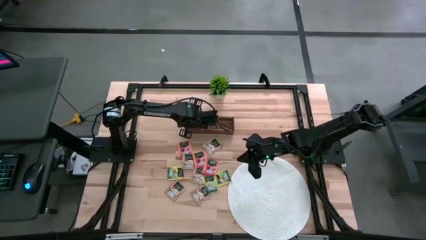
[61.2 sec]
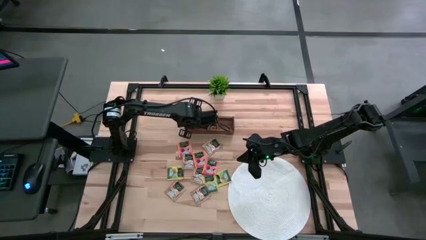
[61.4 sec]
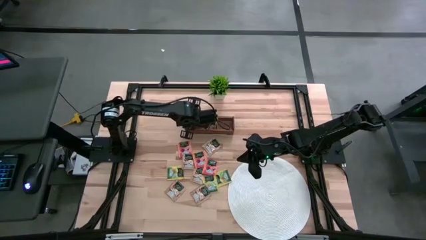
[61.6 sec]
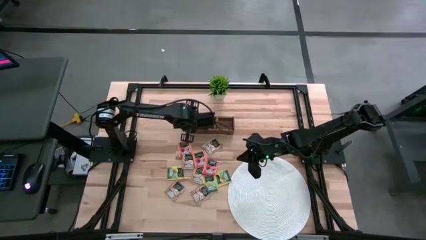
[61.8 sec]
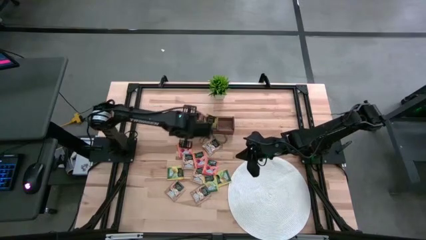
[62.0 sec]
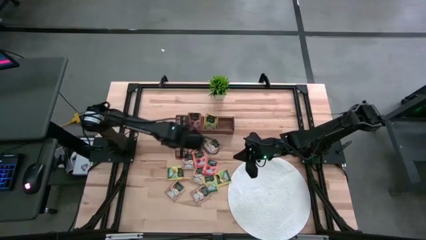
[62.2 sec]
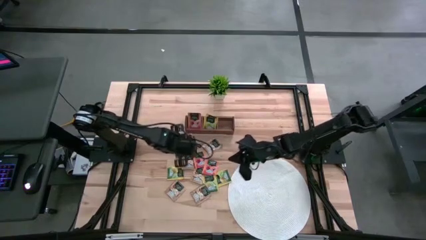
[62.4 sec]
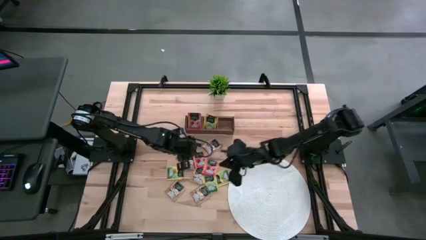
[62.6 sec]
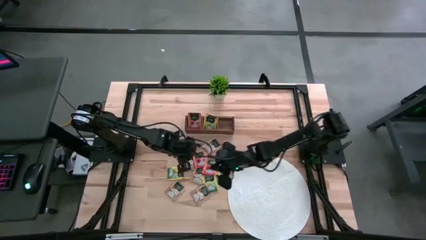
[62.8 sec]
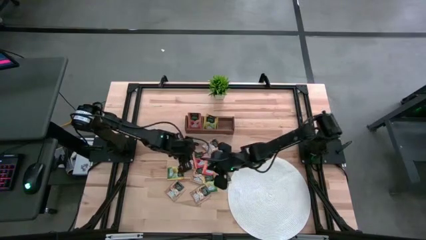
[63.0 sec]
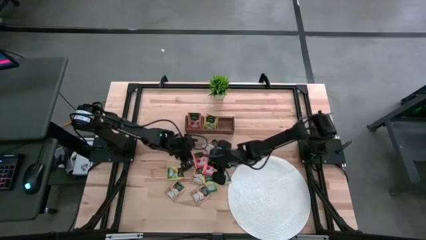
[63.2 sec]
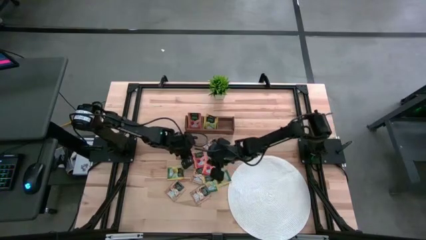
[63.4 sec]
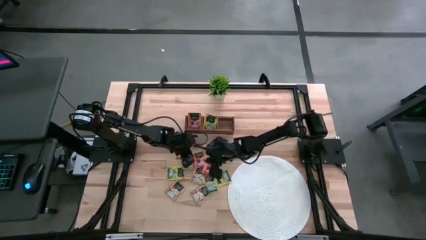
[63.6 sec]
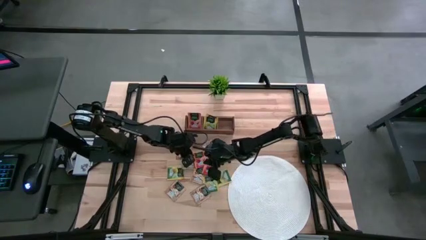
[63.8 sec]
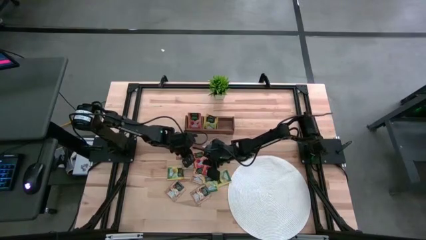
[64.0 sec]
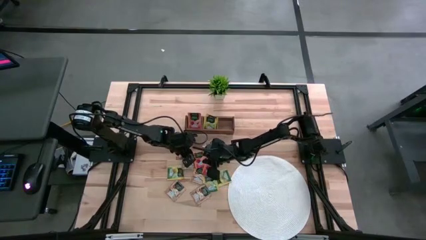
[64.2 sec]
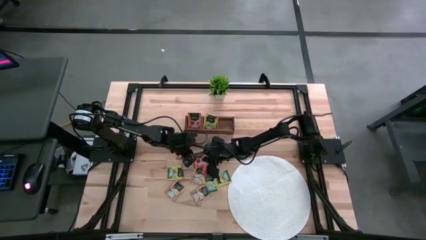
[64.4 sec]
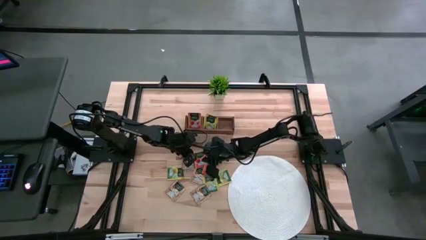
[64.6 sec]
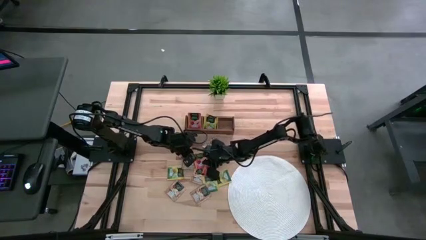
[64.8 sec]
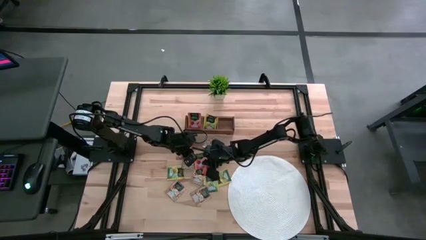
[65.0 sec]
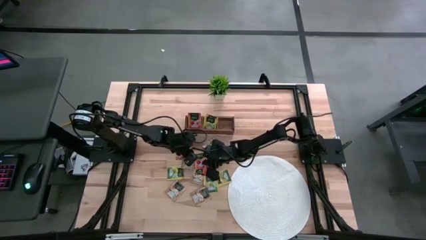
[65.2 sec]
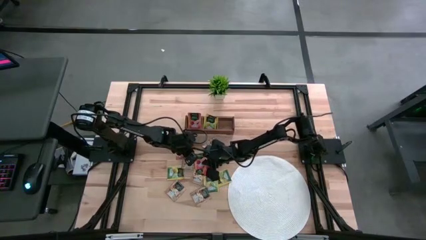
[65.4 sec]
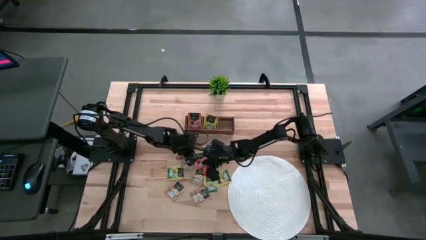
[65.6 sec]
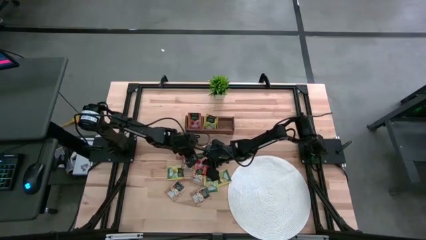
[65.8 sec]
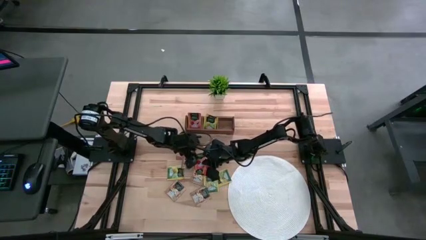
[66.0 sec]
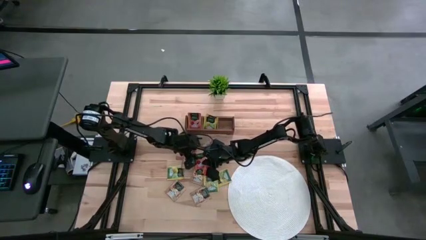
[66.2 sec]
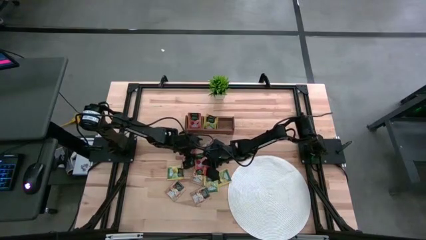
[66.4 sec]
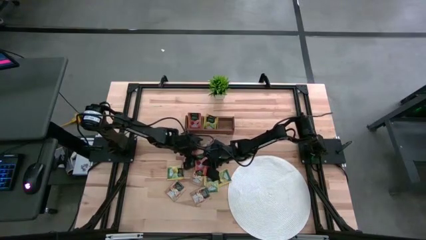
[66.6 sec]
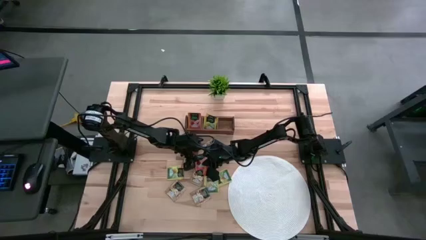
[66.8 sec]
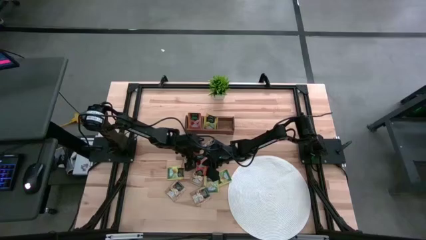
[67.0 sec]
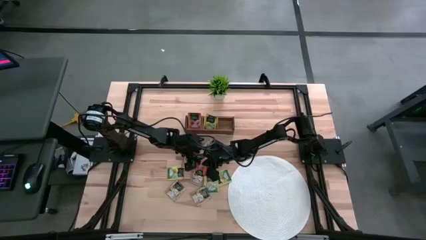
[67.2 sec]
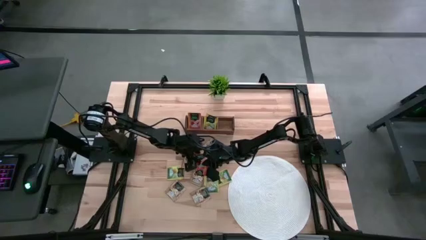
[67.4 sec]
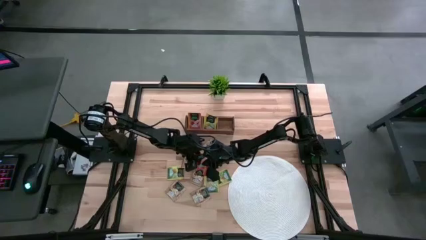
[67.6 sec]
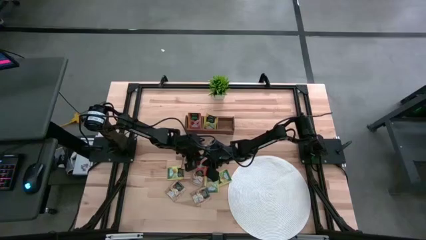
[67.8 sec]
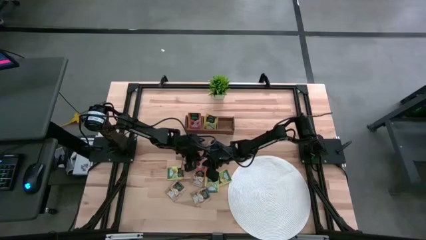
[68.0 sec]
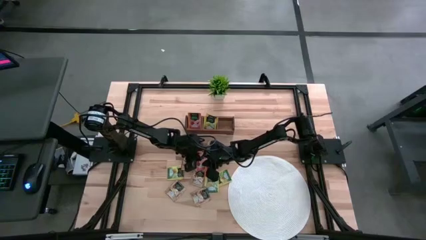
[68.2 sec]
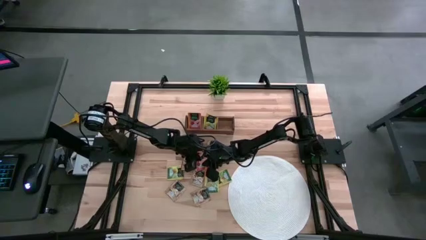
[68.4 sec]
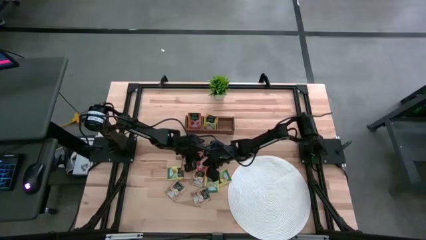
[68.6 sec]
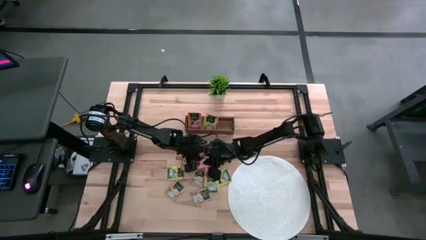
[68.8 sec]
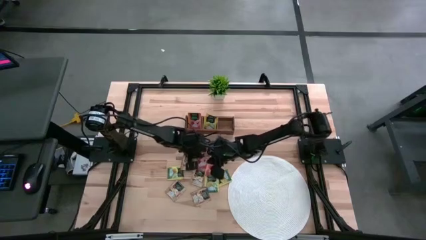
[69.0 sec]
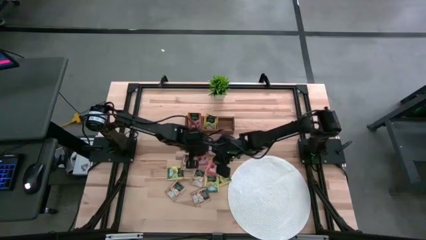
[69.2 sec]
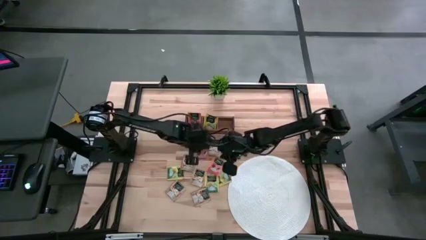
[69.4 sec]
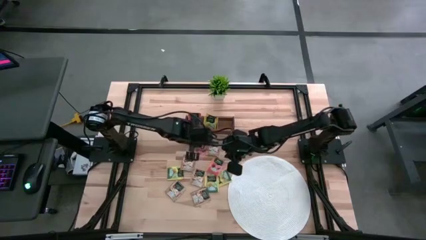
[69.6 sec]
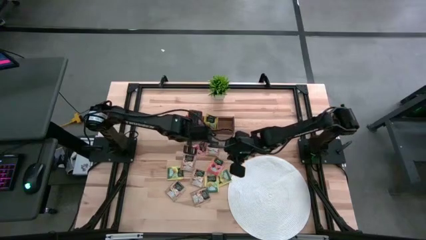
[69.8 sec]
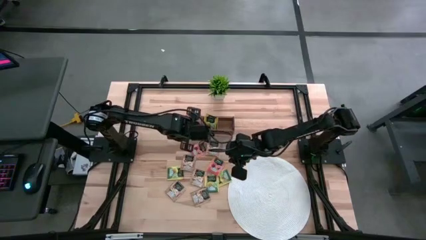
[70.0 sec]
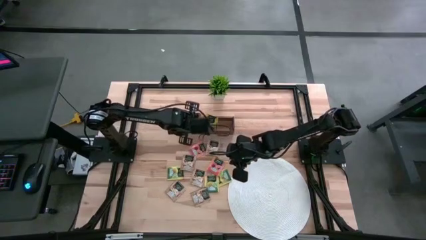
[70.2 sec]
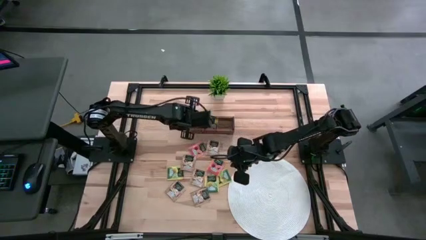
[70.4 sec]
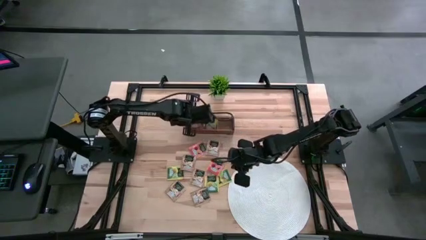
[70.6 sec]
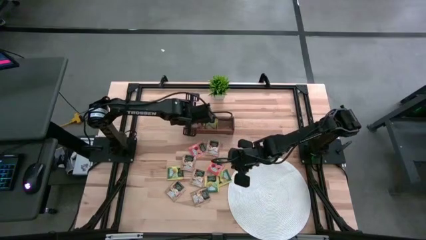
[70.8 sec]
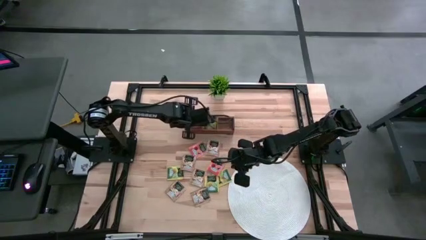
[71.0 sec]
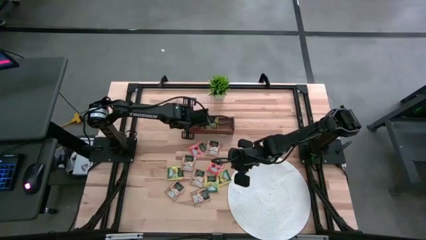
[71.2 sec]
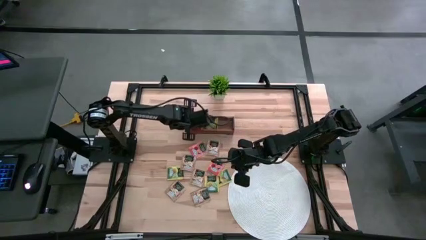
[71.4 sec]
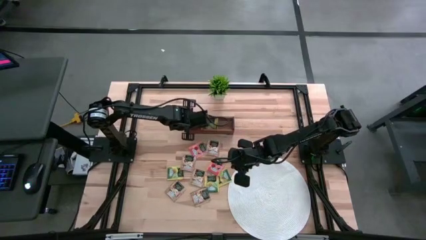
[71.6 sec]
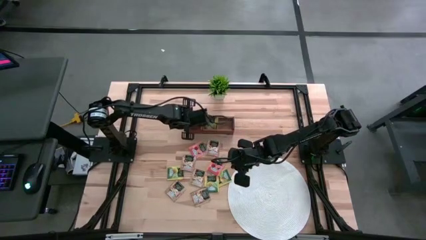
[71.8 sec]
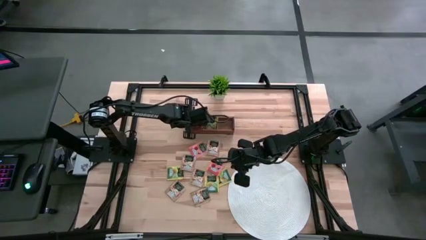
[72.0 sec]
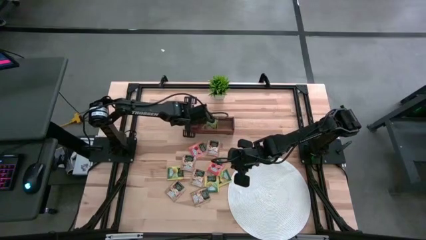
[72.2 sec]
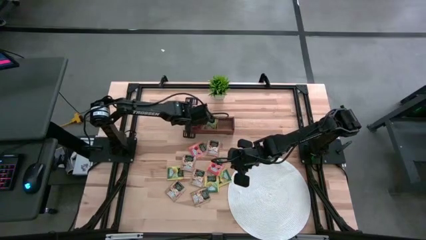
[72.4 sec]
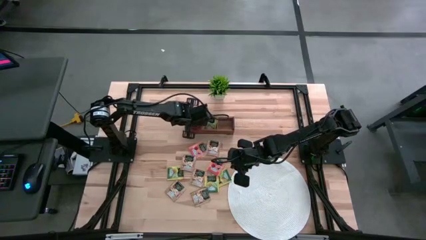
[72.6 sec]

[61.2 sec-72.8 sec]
Task: Pick & Place Tea
Put the orange tea bag into the left section of the wooden organizer
